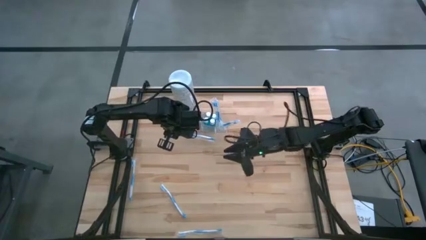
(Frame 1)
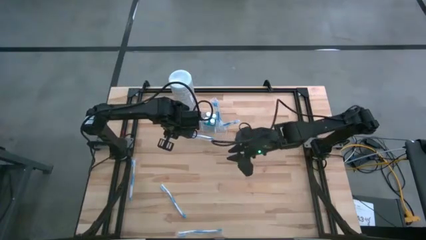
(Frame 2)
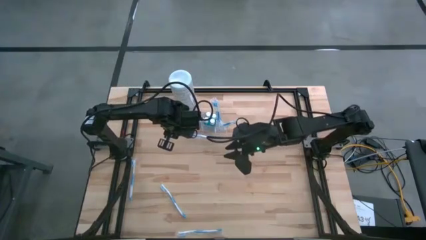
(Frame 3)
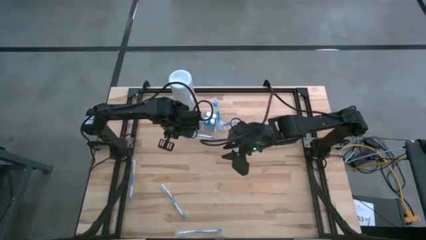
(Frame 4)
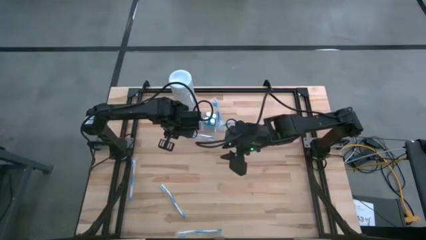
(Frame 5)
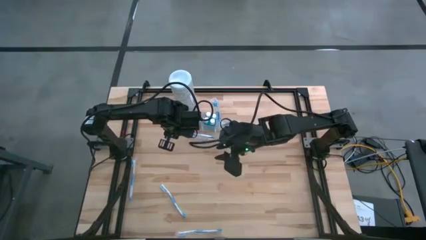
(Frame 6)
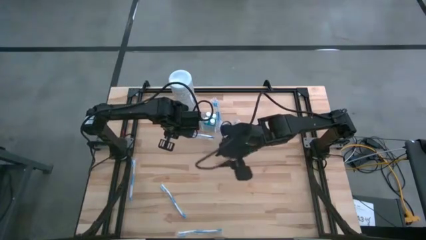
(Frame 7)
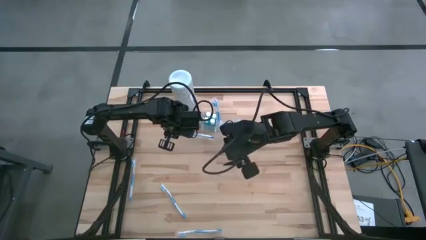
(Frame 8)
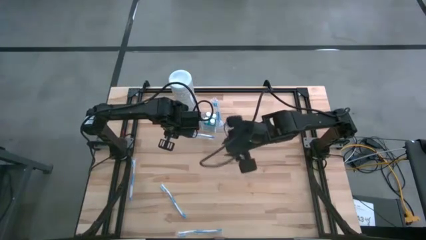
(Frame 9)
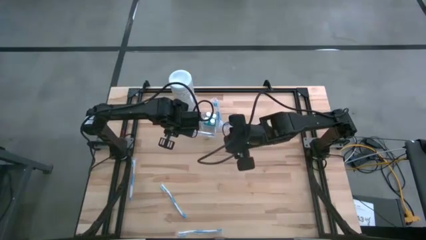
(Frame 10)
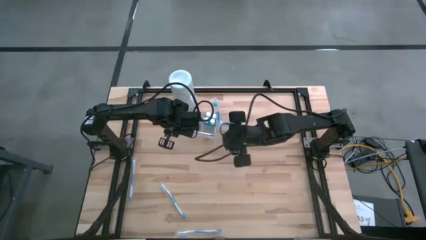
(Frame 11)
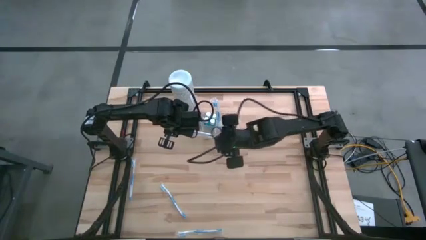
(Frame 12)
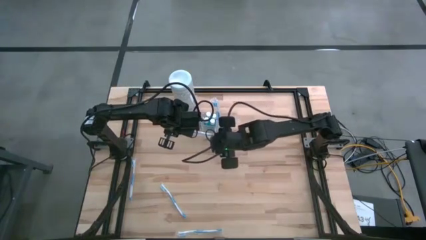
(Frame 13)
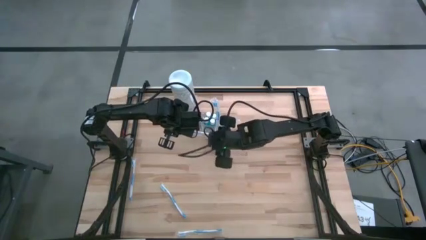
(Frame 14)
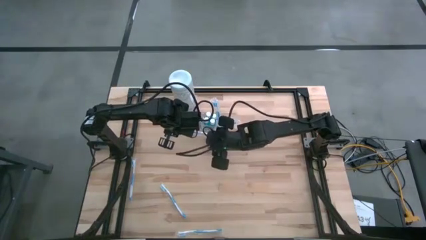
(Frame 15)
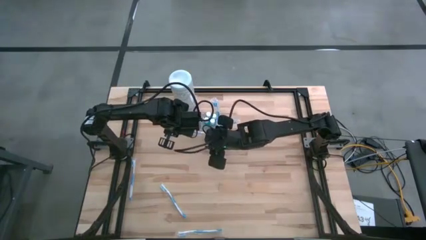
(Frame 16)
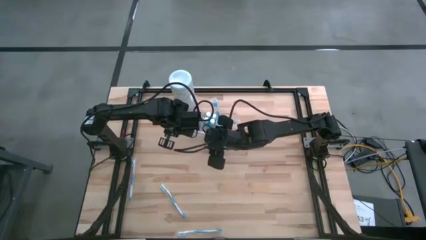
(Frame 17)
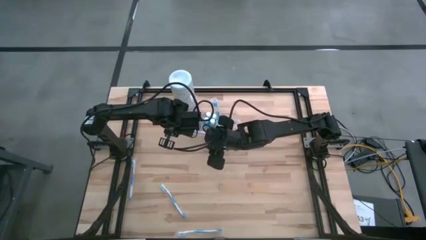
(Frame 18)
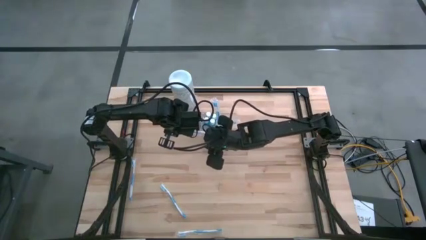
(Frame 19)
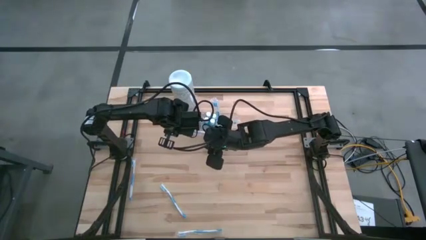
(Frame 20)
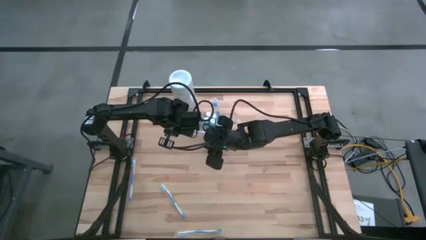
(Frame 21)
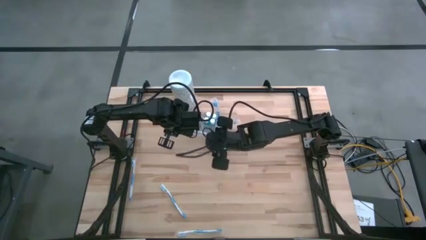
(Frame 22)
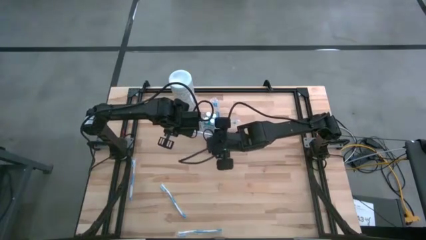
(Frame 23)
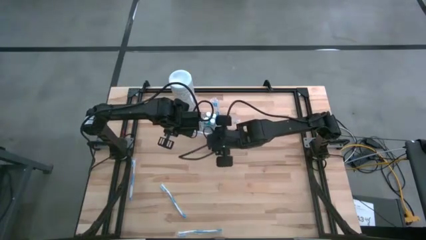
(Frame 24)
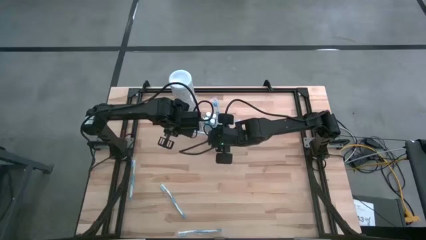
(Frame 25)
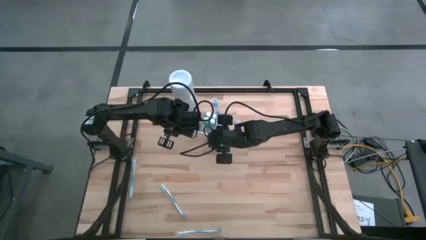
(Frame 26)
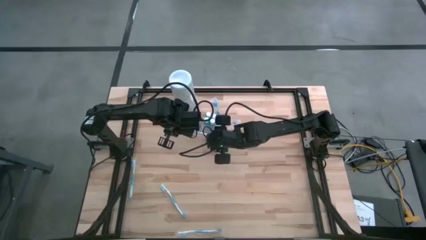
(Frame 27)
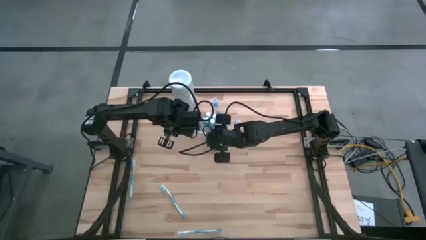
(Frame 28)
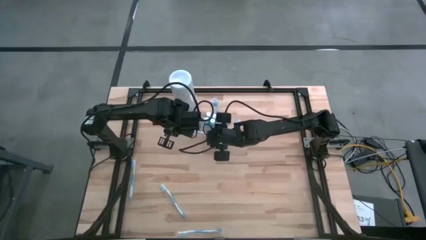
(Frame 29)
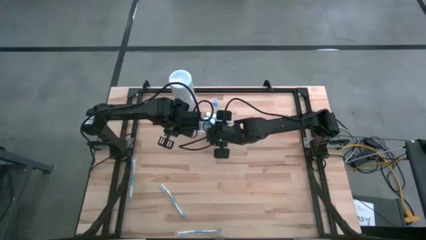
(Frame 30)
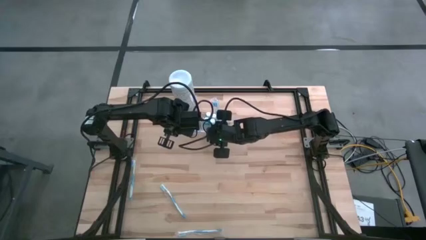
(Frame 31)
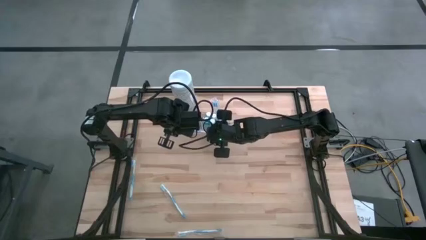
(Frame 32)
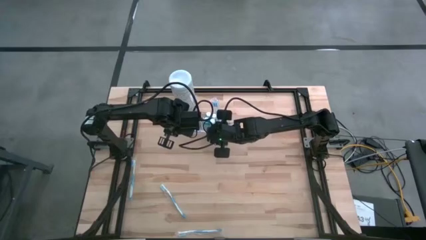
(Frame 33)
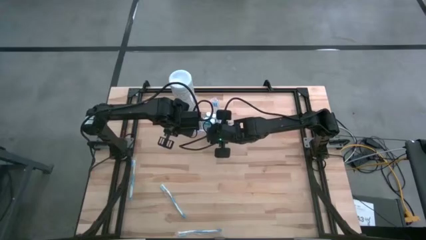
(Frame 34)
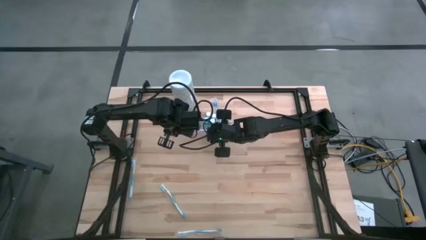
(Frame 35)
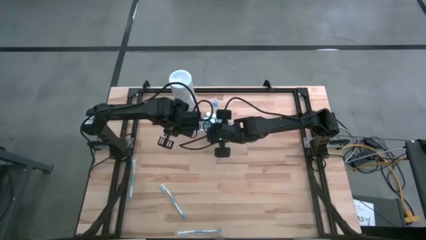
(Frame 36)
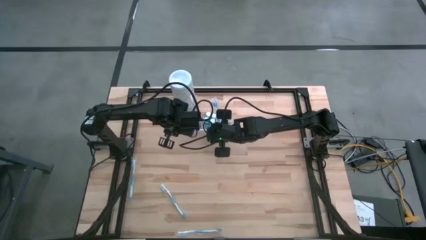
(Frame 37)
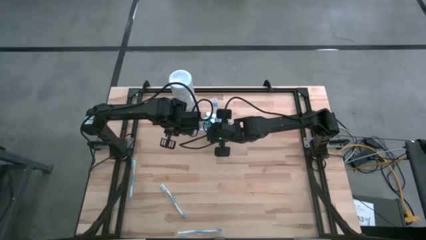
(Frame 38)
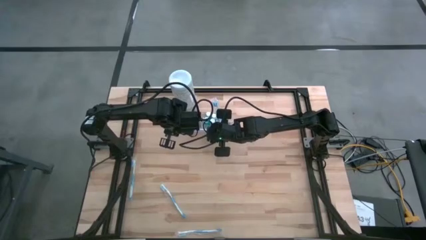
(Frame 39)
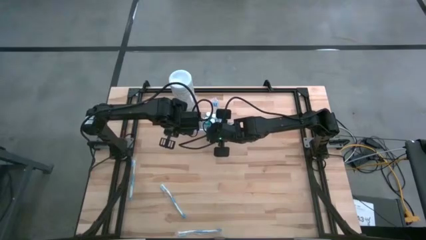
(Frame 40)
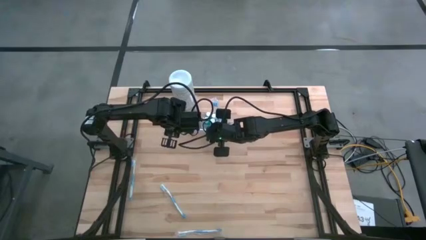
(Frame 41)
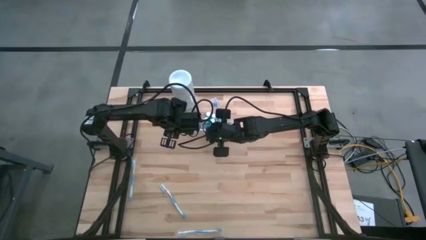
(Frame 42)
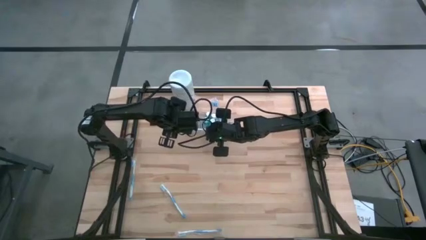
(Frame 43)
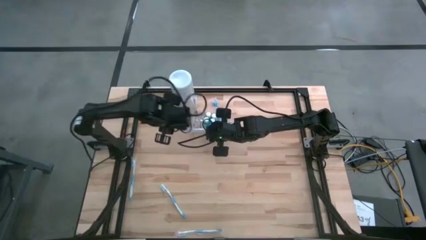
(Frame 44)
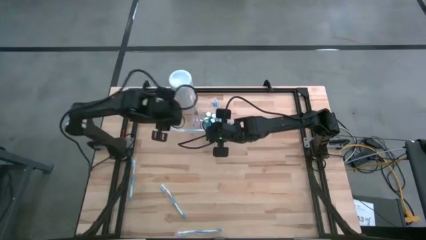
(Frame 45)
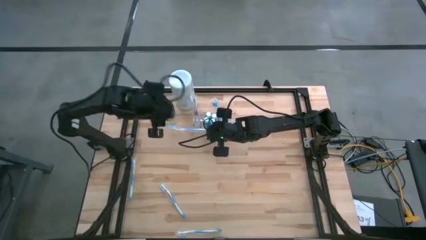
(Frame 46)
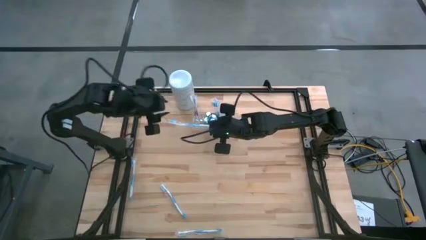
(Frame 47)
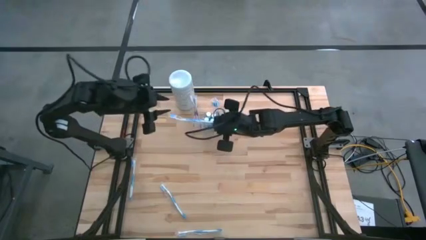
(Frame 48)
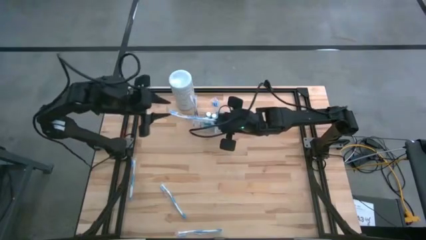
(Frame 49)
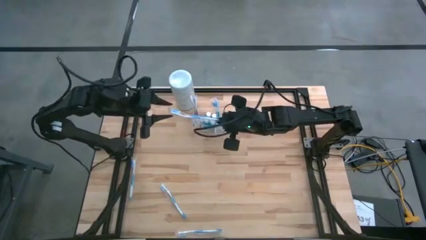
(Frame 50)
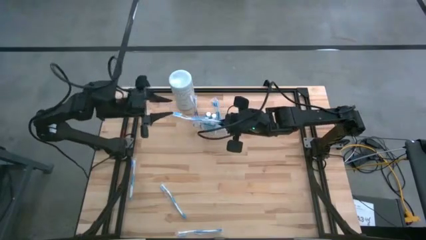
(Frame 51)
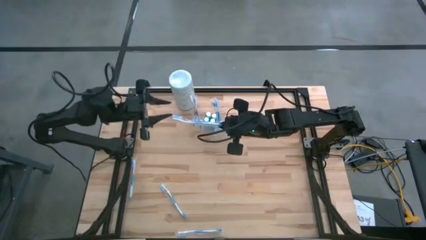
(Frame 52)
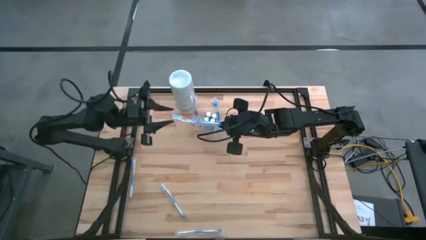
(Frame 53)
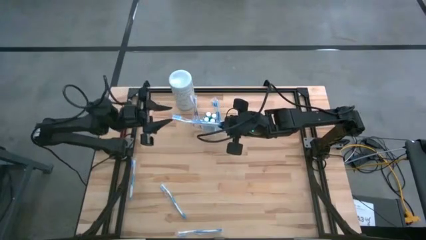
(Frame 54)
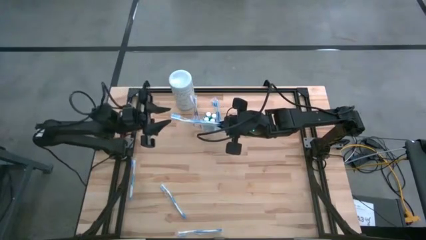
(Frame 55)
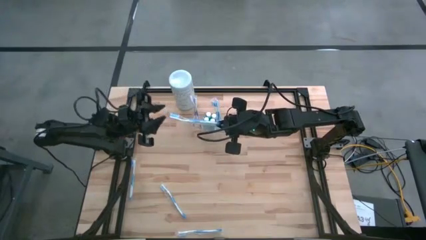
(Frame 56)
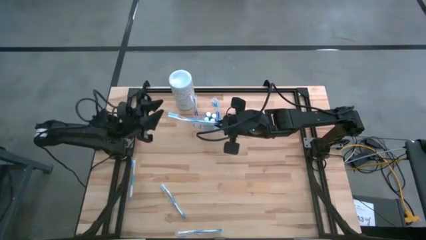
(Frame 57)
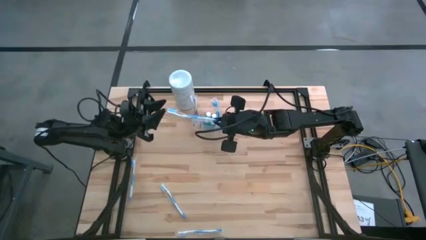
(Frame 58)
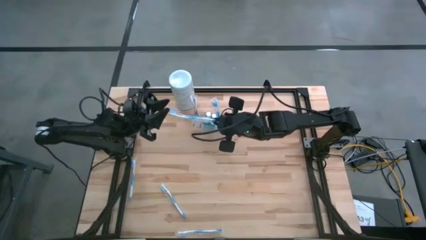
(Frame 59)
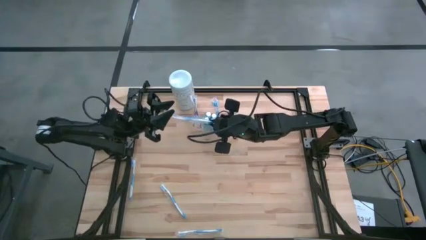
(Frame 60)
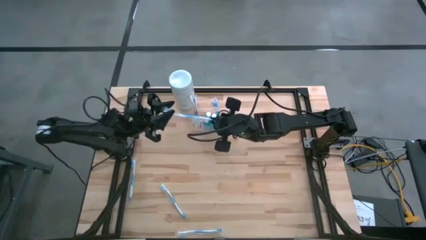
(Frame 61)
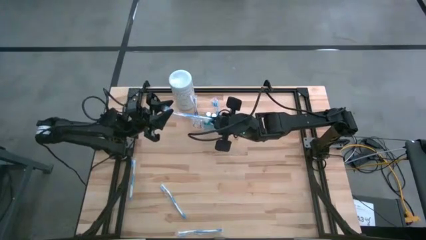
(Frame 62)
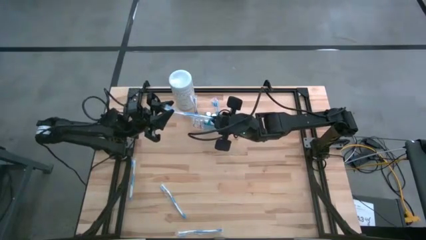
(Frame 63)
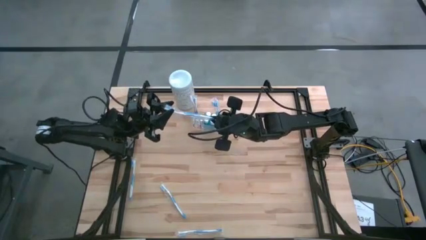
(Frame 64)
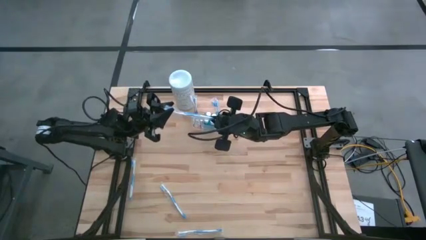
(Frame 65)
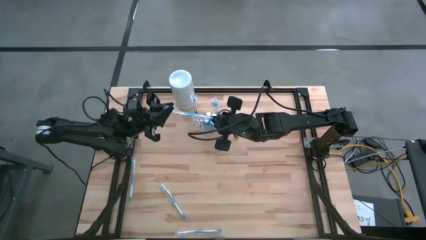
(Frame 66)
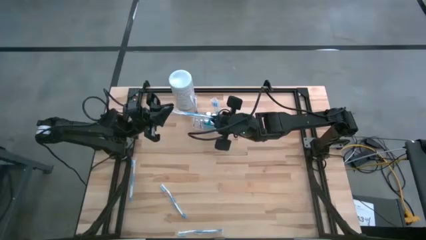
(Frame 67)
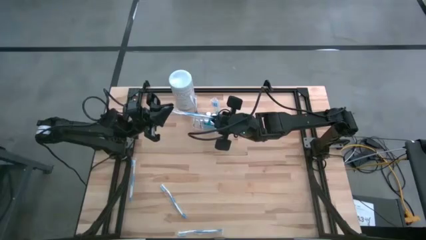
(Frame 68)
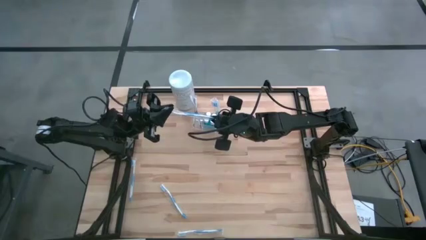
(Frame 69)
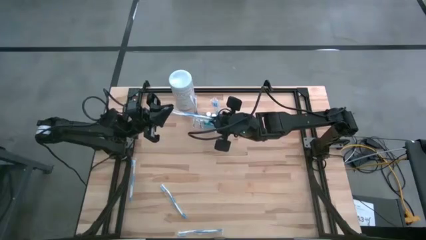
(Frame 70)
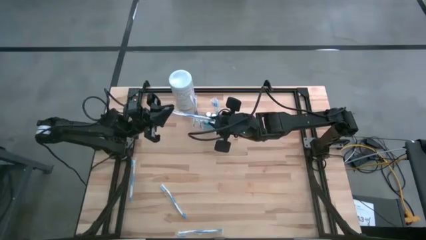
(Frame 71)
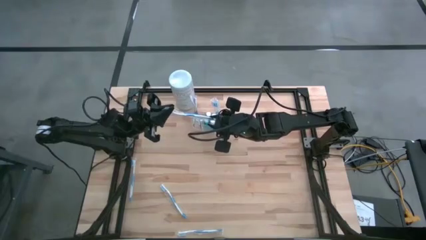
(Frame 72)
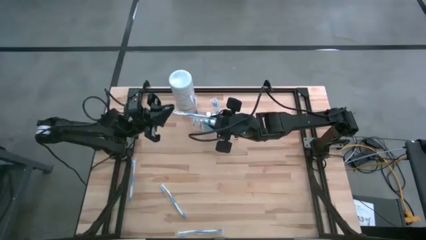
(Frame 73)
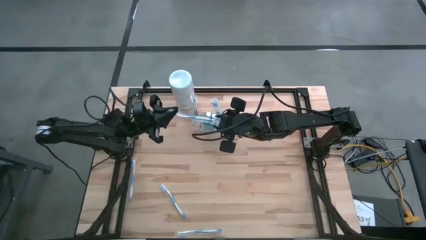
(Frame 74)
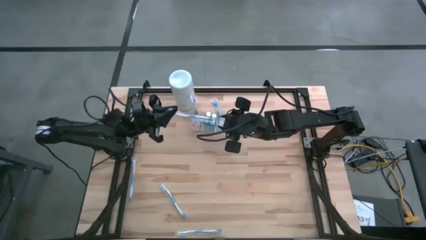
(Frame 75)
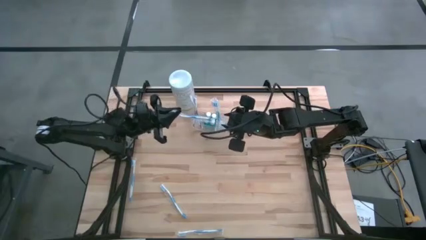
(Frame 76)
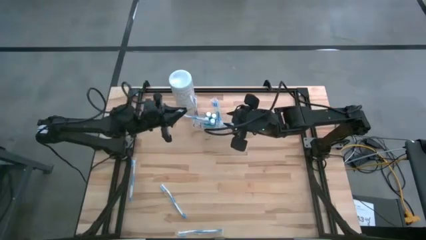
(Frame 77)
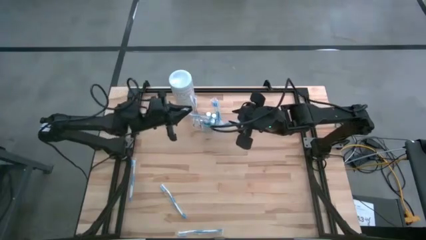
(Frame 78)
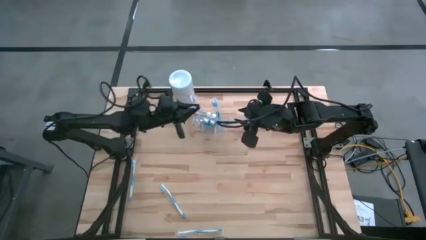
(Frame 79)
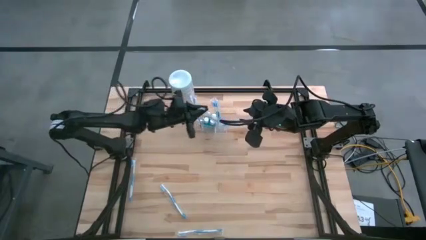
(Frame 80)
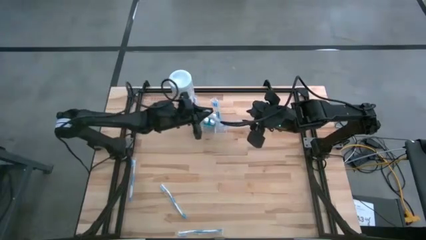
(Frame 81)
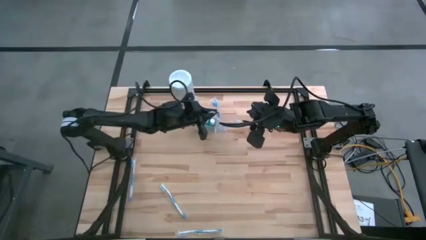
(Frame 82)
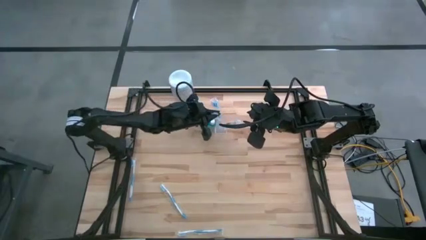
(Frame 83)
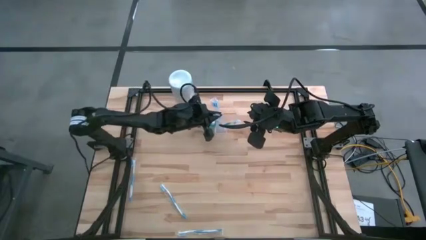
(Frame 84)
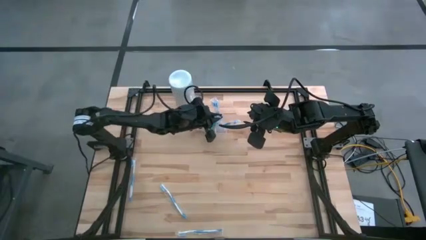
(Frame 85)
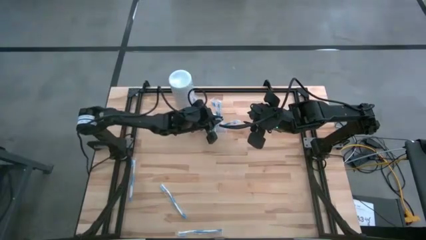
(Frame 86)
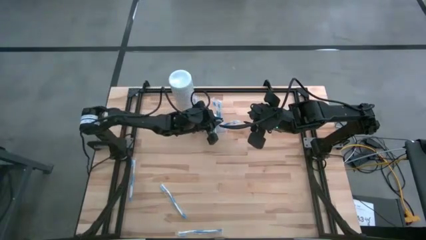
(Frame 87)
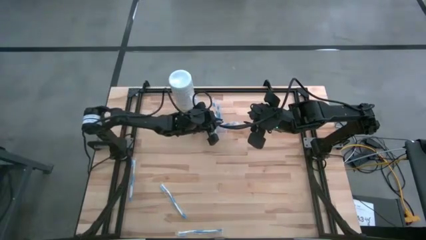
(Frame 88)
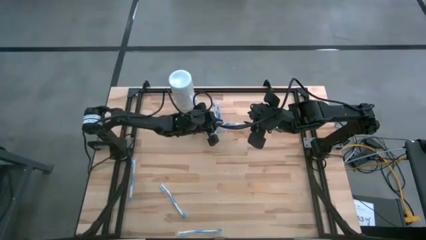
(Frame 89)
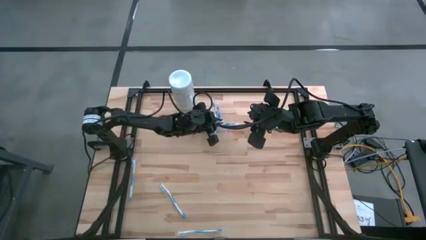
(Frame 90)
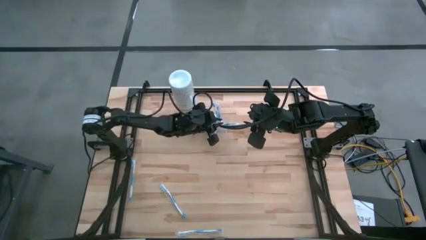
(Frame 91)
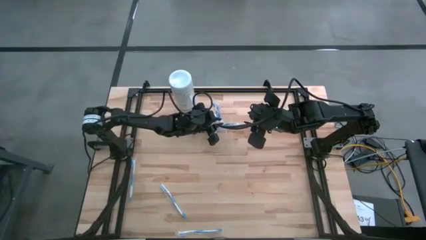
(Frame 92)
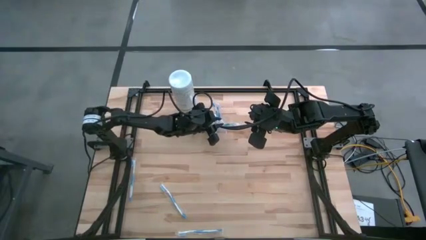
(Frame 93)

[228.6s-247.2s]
Task: Pick & Place toothbrushing station
Put the blue toothbrush into the right of the transparent organizer
